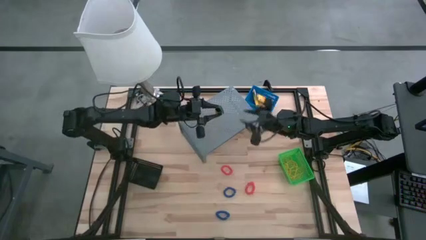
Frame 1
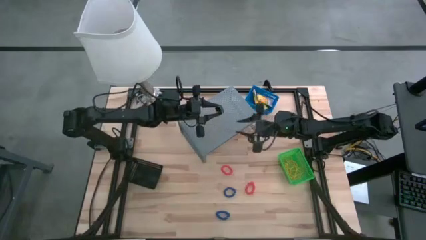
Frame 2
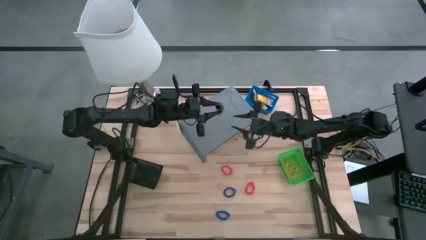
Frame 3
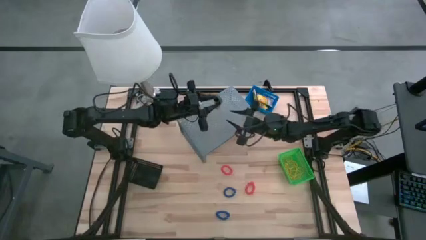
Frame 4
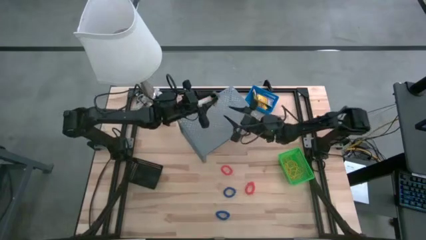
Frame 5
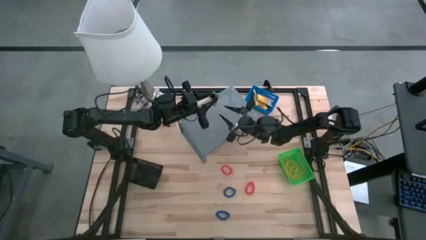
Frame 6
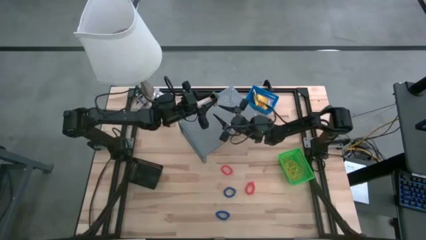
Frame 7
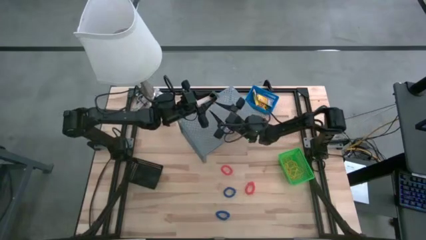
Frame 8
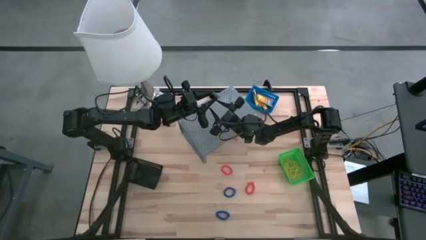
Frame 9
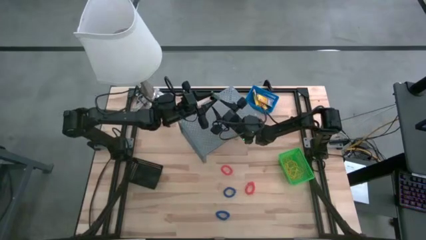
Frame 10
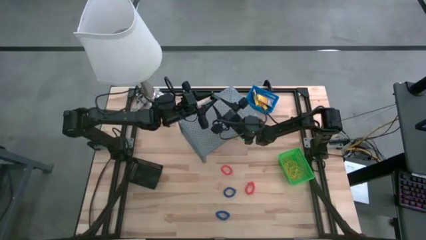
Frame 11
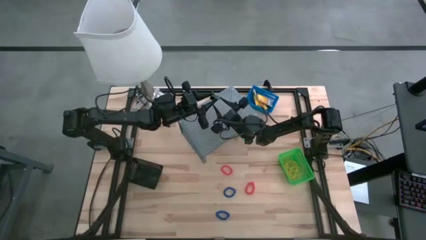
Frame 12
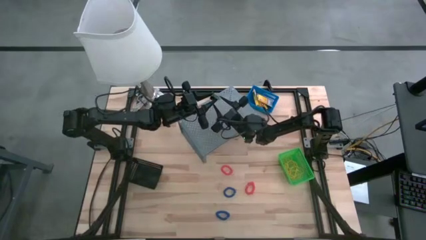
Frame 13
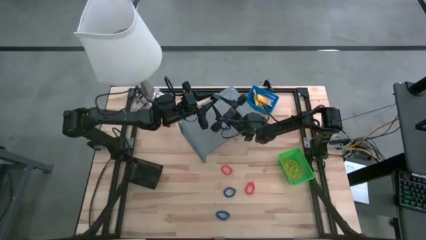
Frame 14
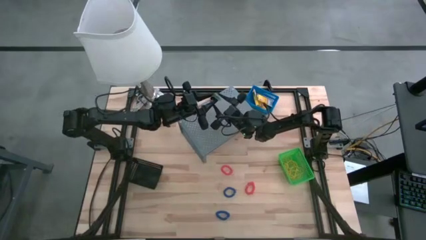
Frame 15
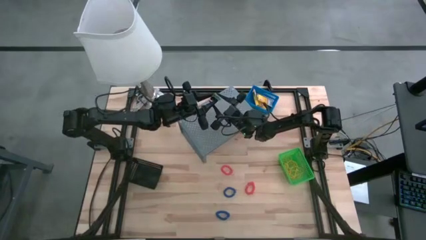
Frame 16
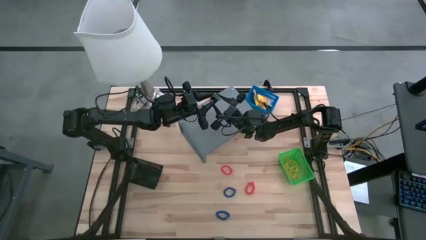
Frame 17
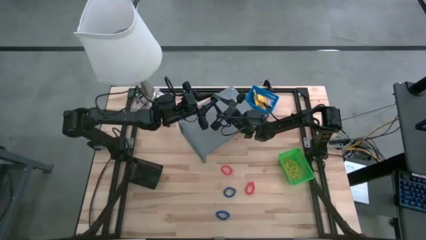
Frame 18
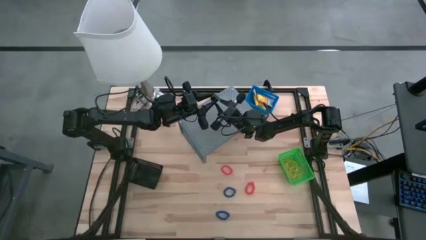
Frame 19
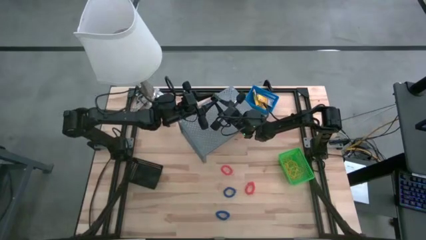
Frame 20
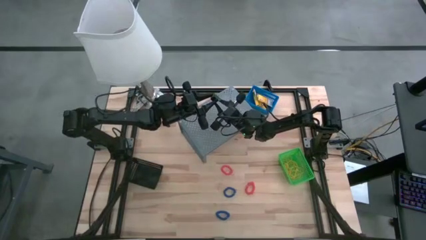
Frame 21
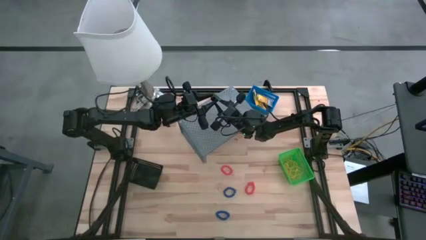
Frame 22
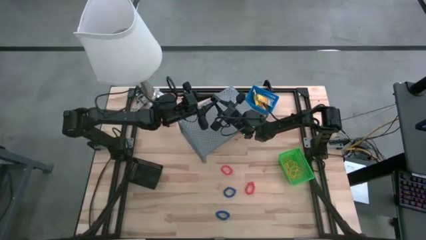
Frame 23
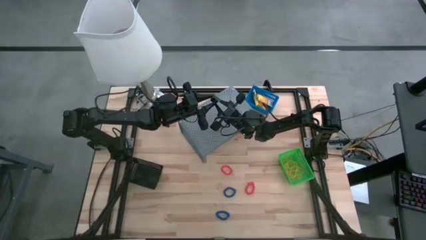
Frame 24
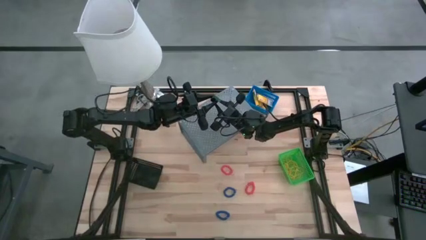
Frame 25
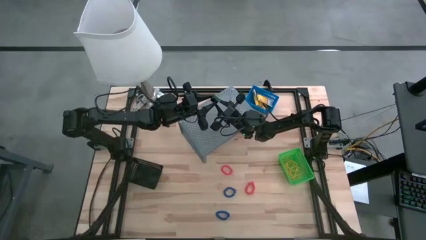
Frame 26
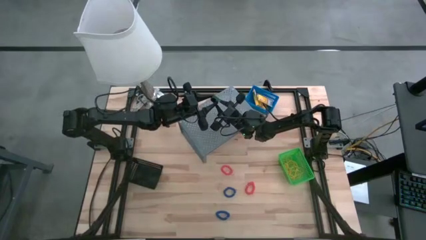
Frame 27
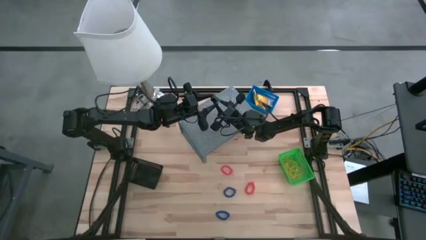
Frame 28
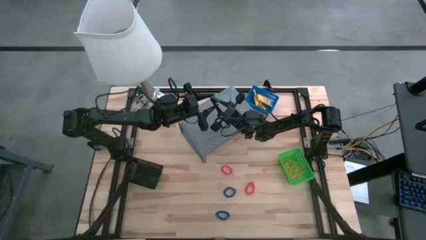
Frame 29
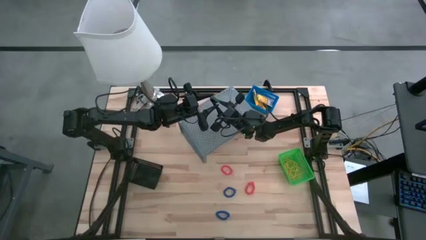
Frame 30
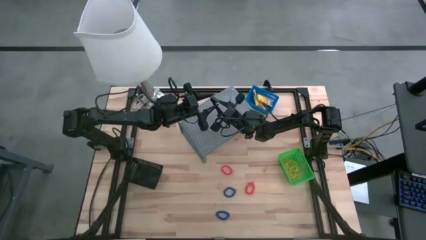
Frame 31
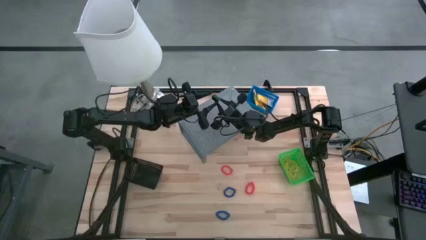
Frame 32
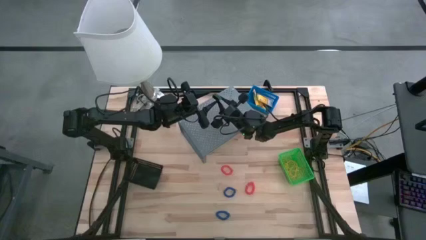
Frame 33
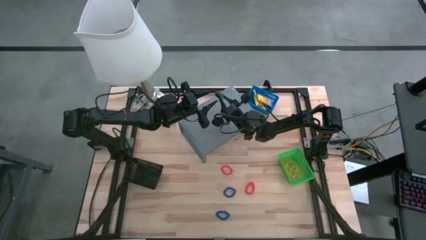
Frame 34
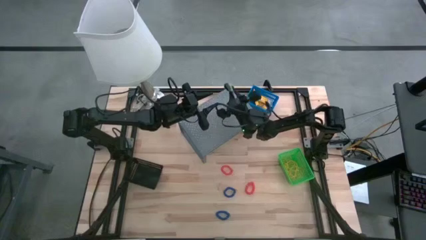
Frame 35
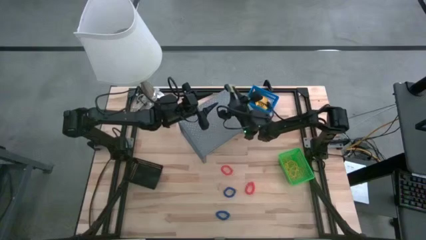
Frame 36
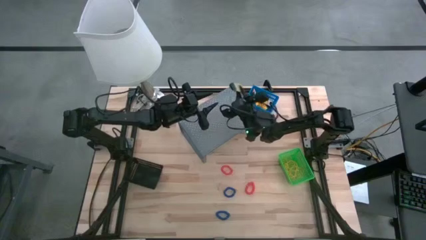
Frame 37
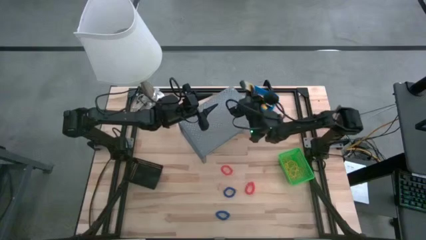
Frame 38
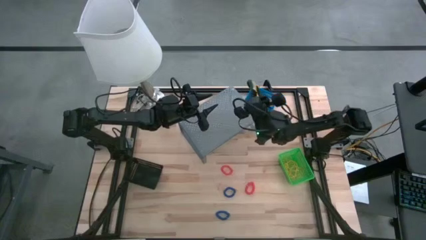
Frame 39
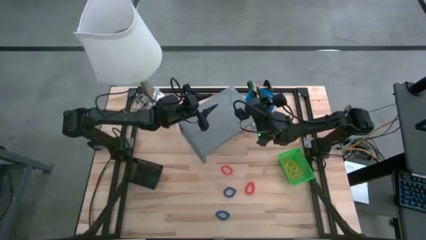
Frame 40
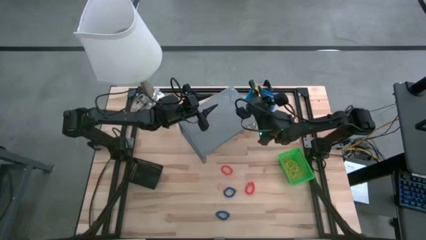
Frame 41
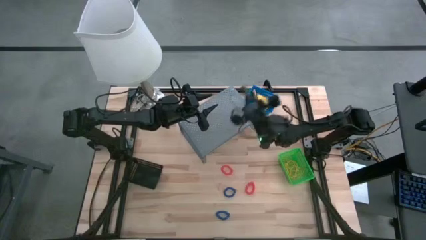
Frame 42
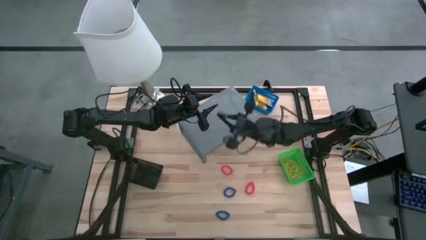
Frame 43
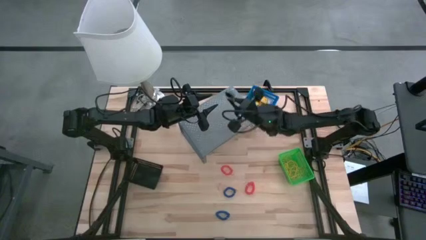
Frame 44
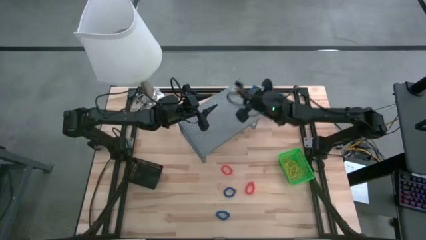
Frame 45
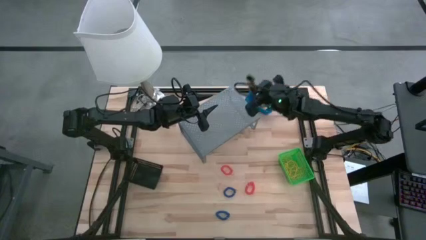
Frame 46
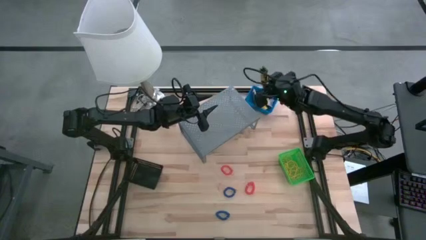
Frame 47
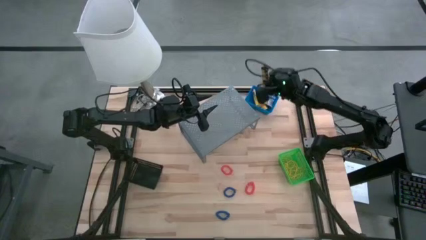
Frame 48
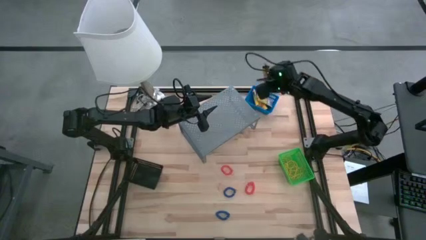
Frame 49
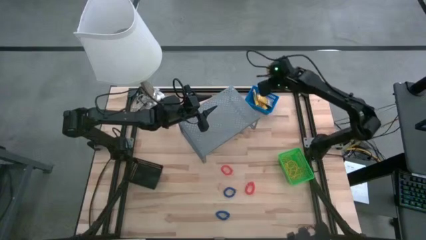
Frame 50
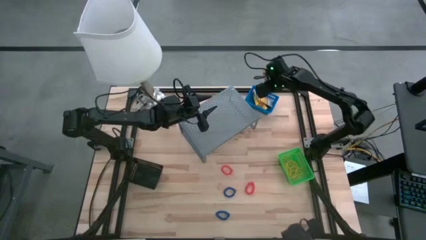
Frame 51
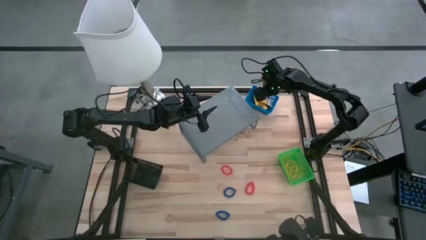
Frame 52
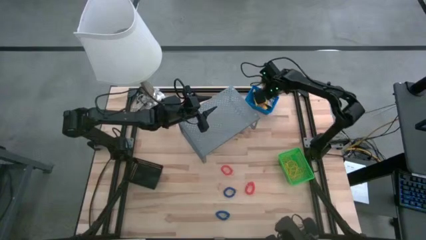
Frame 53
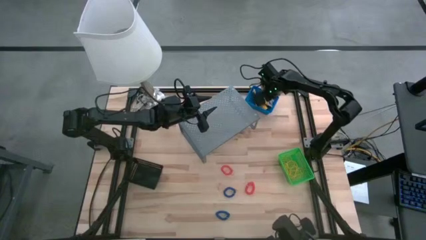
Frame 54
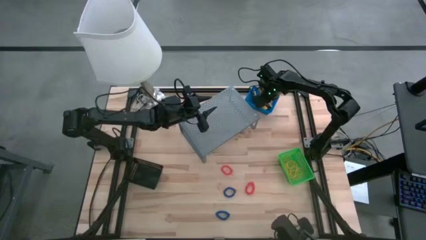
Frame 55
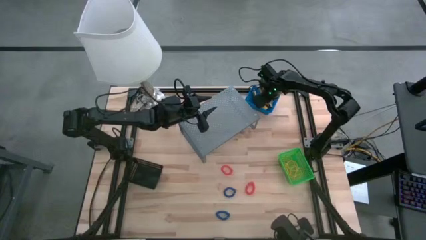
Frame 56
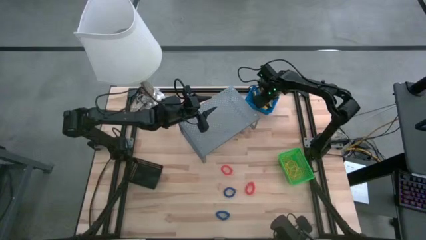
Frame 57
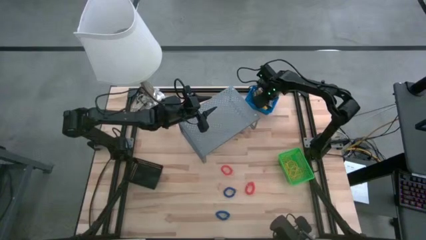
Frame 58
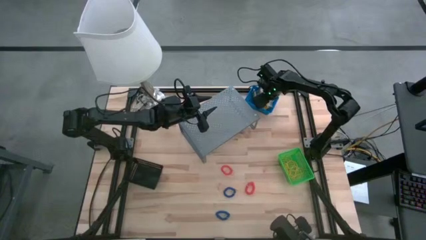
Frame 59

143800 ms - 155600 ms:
Task: Pick & Place Office Desk Supplies
Put the crayon box into the blue basket
